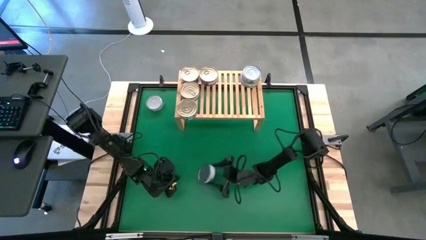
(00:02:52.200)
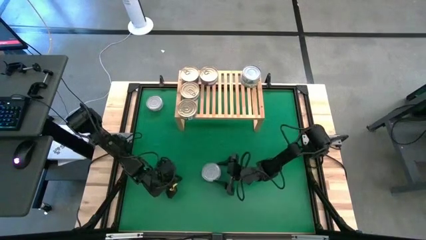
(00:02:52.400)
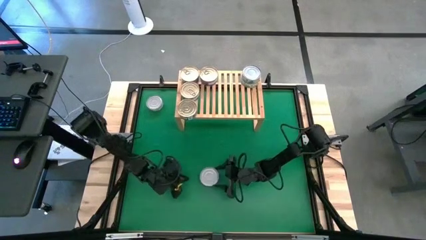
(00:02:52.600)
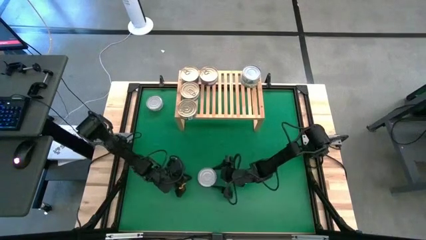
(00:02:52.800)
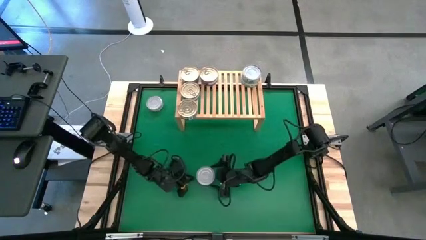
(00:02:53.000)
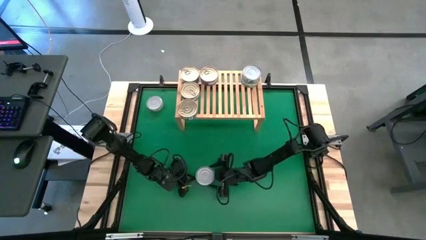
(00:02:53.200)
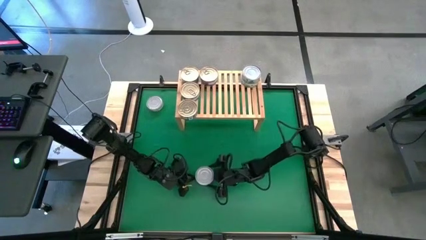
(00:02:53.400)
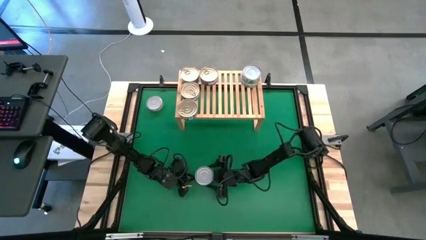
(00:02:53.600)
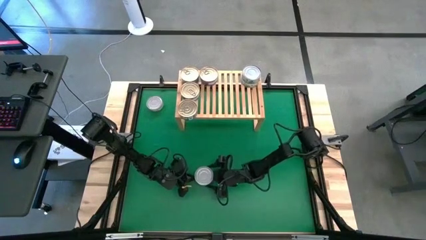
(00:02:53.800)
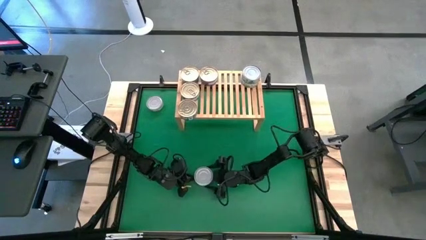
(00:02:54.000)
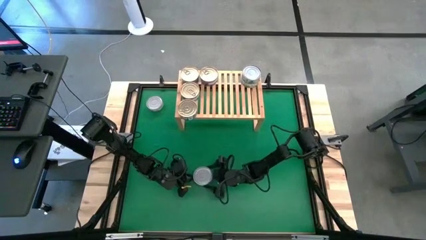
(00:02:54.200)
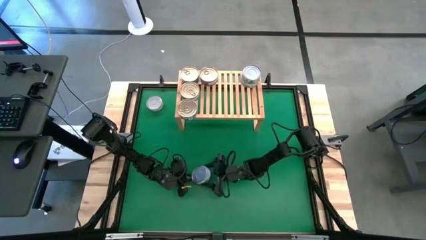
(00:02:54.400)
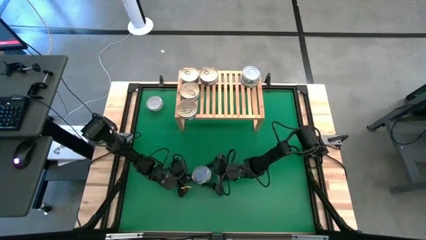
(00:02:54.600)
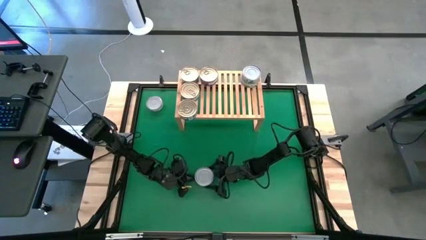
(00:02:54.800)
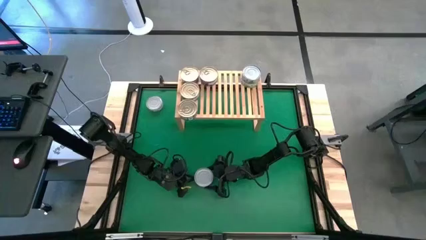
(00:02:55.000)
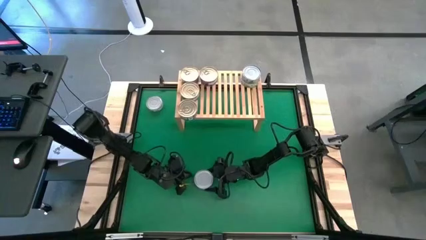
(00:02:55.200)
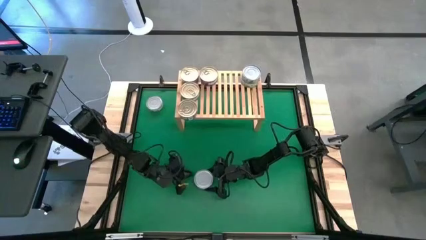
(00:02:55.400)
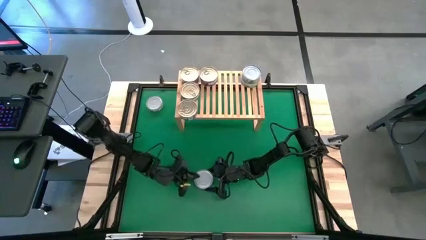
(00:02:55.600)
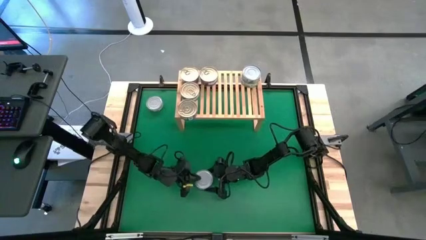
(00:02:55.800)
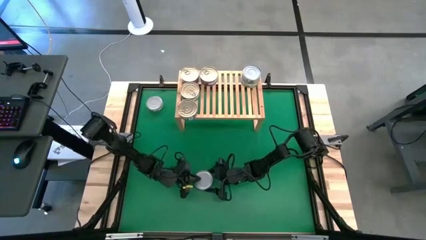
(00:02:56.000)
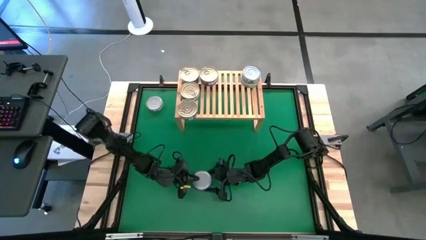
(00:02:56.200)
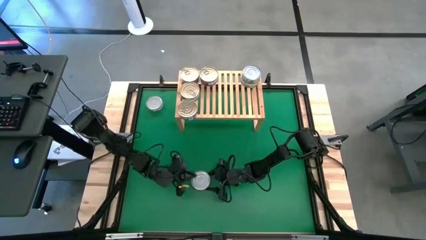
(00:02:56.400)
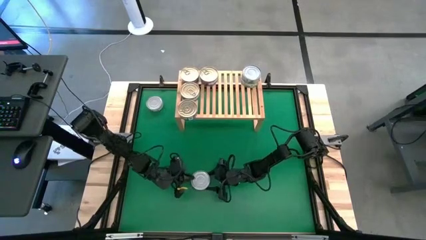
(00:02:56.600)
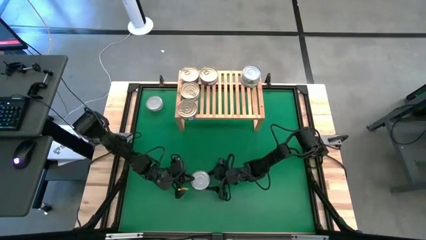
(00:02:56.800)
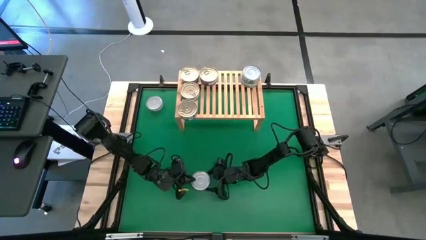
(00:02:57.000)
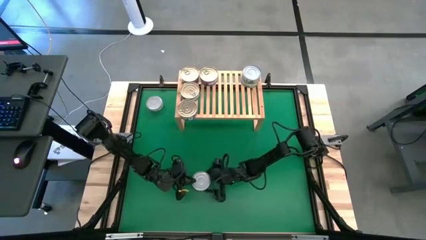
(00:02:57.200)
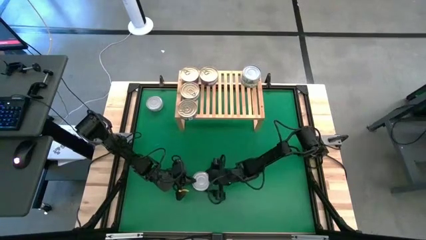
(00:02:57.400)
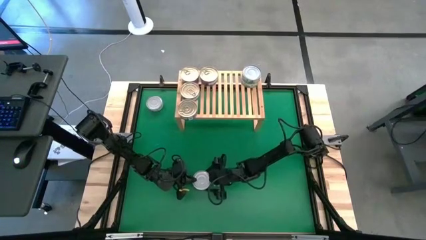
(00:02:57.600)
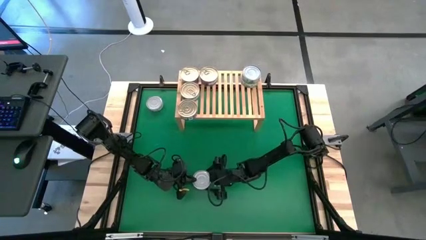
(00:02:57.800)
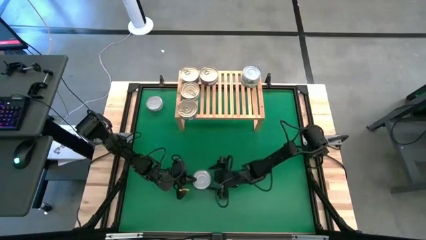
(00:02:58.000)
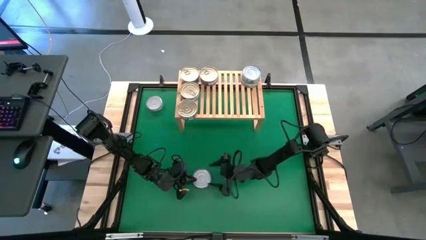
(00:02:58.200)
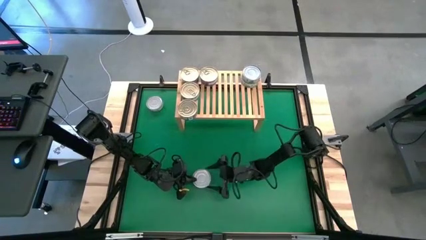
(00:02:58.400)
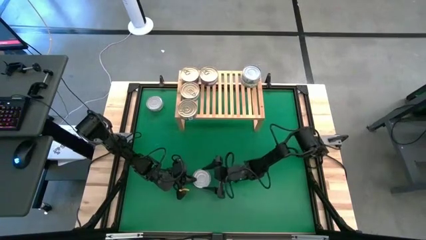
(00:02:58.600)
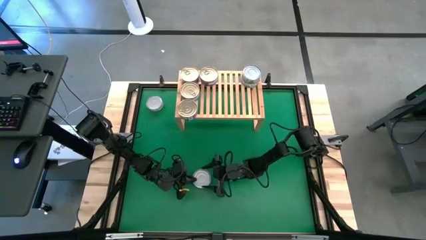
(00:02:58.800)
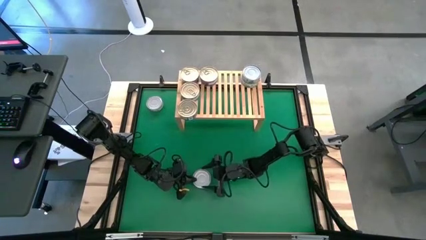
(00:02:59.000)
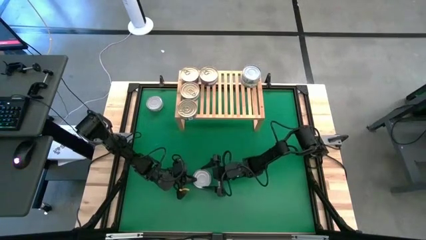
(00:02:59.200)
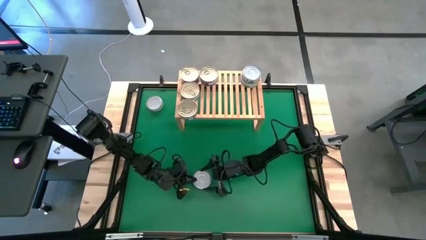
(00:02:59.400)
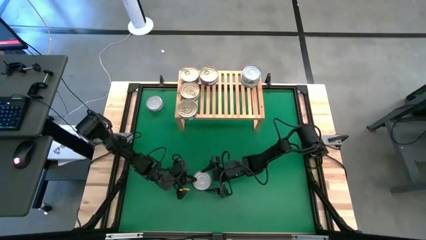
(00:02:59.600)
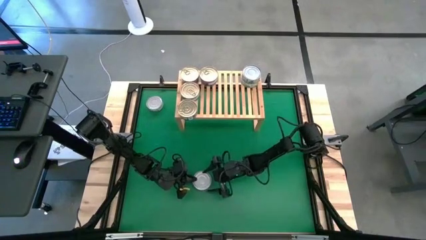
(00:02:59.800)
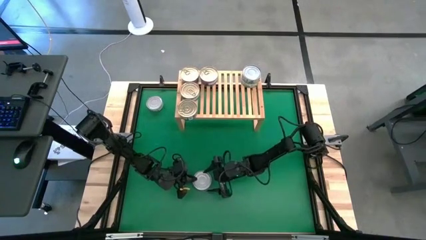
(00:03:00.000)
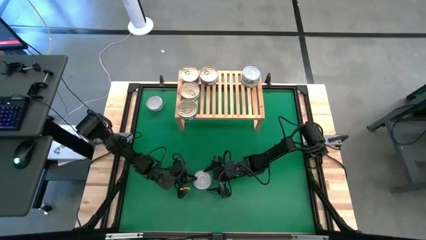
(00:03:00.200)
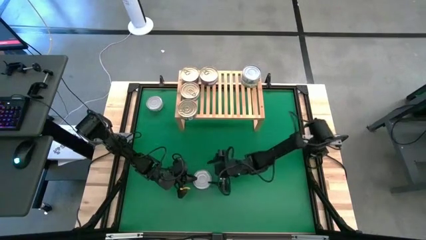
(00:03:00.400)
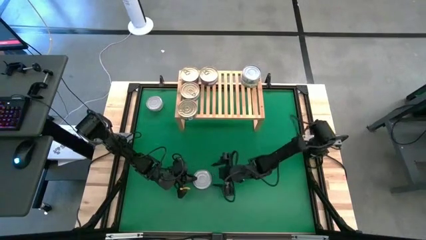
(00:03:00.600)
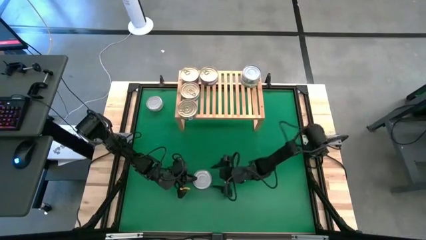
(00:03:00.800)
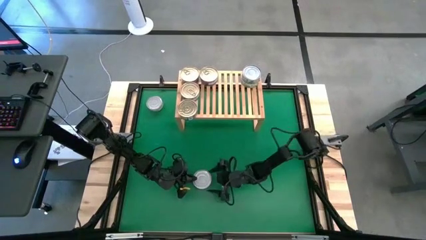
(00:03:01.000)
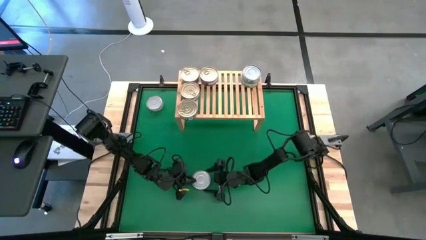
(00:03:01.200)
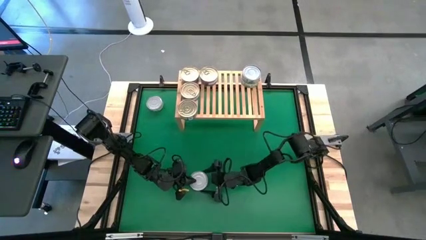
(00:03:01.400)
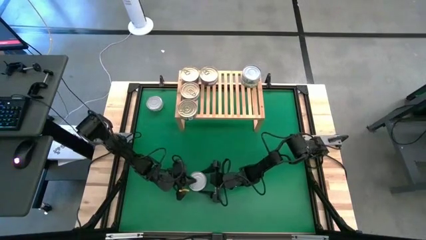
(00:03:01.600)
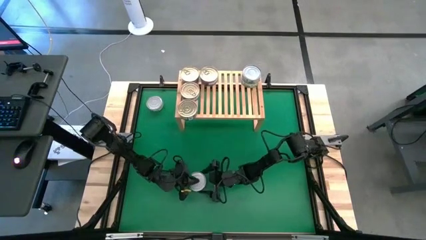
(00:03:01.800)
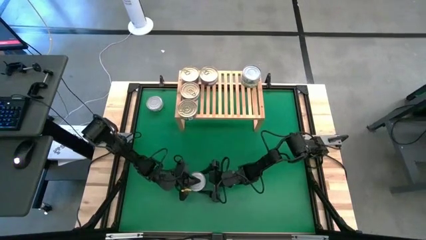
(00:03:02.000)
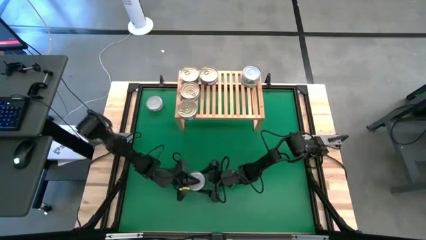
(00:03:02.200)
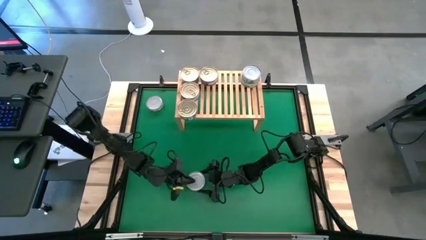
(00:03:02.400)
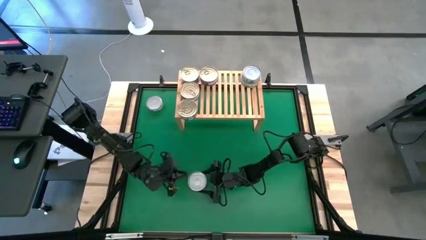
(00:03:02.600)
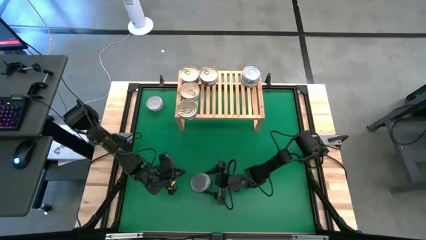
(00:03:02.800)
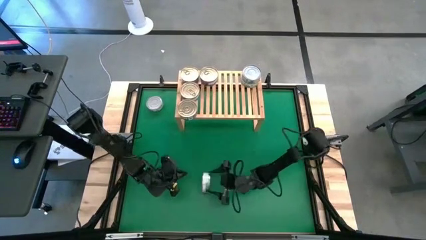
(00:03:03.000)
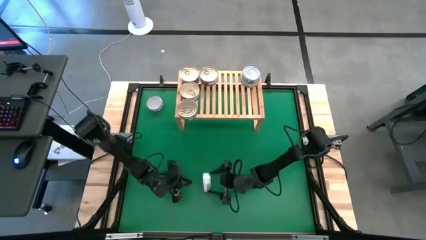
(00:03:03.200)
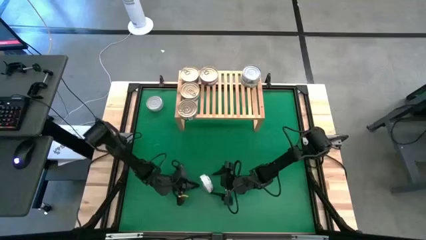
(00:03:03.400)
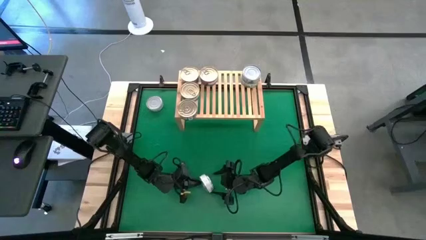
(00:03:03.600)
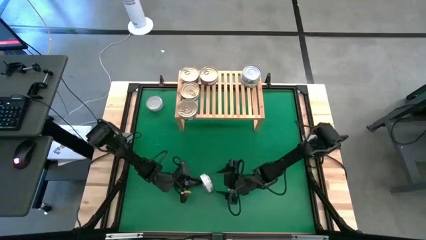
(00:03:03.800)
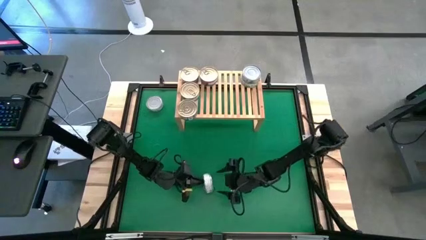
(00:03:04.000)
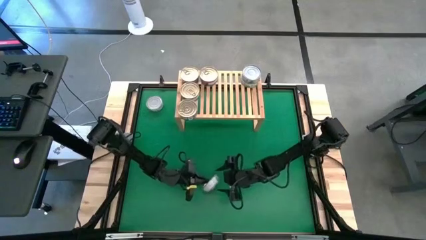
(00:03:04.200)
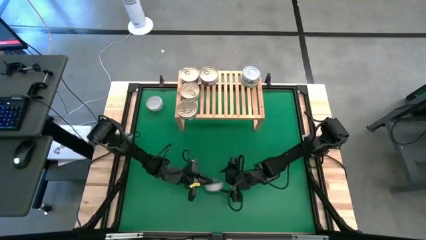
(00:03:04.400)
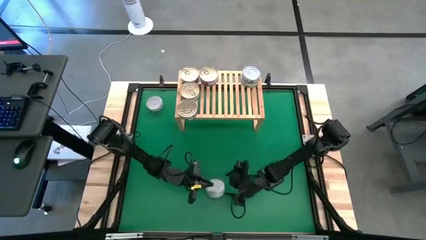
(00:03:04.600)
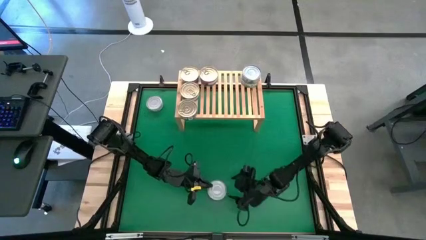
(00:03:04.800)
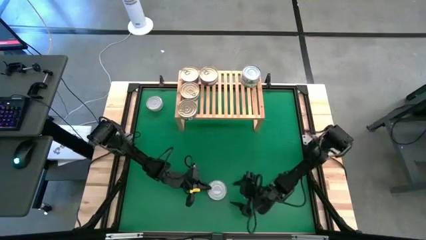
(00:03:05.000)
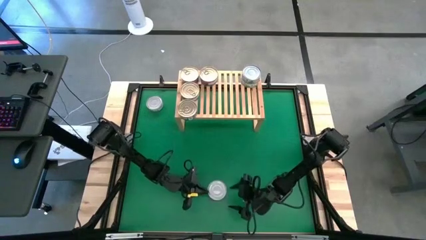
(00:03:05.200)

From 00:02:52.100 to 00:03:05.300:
Task: Stack canned seafood by type on shelf
Put the center green tuna can on the shelf aligned with the other green tuna can

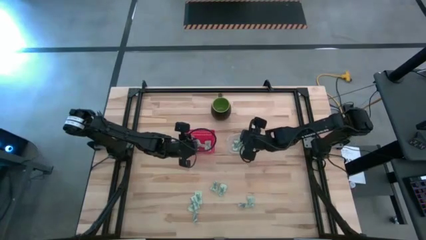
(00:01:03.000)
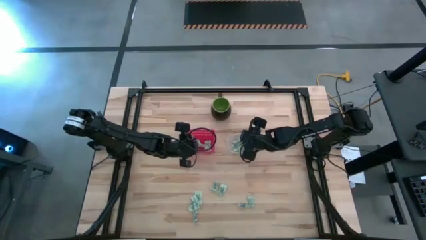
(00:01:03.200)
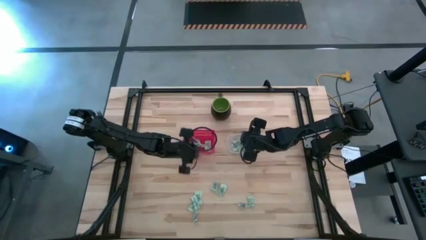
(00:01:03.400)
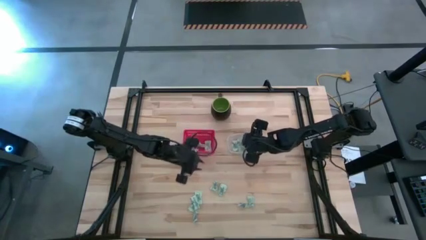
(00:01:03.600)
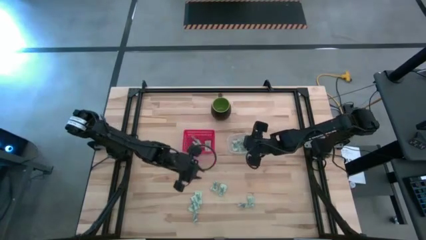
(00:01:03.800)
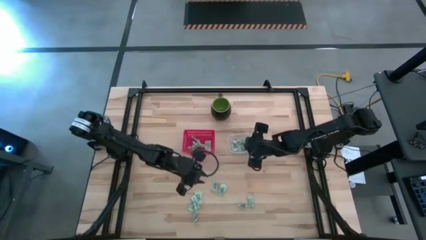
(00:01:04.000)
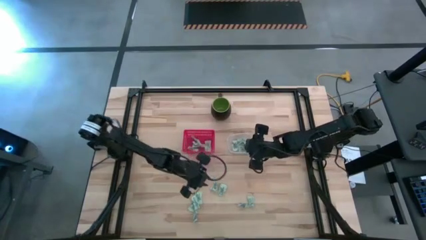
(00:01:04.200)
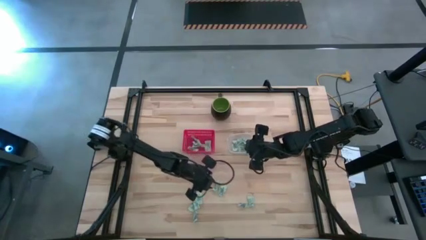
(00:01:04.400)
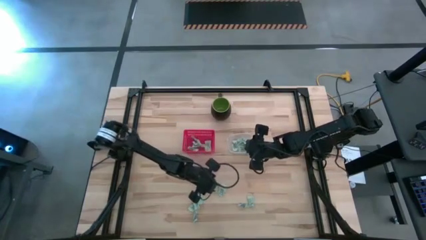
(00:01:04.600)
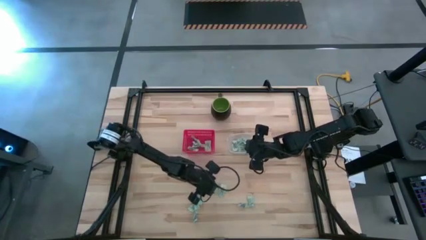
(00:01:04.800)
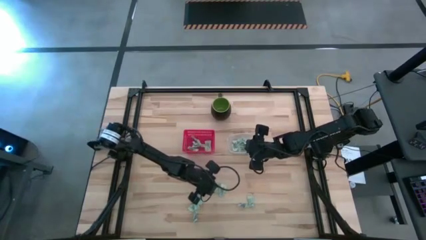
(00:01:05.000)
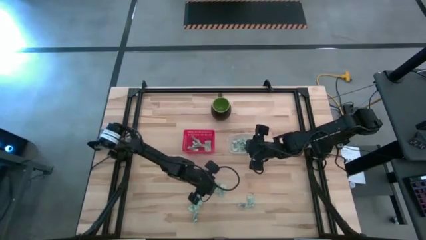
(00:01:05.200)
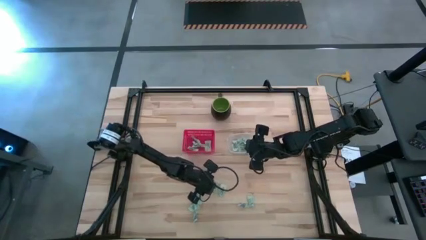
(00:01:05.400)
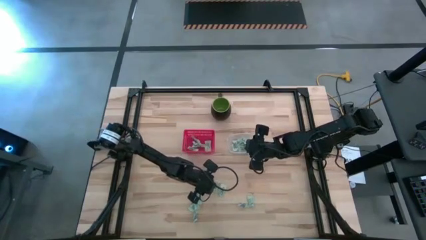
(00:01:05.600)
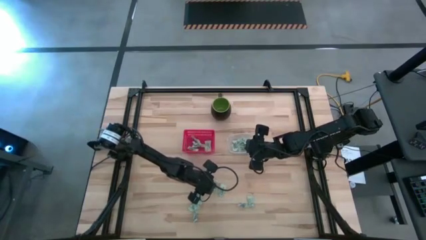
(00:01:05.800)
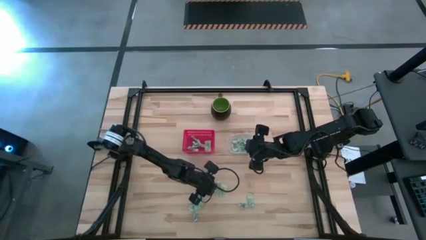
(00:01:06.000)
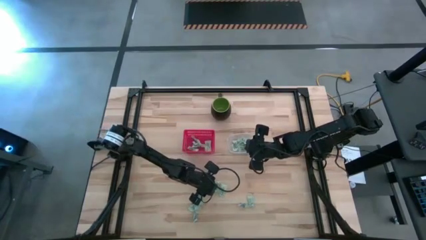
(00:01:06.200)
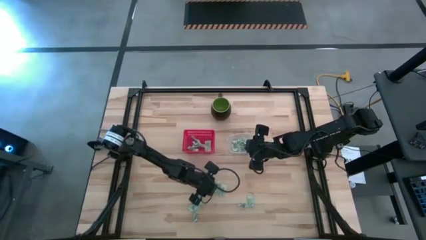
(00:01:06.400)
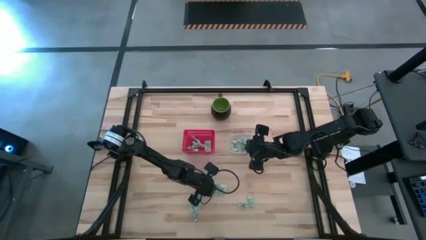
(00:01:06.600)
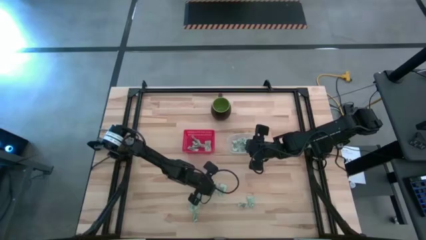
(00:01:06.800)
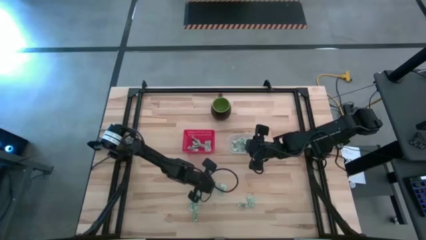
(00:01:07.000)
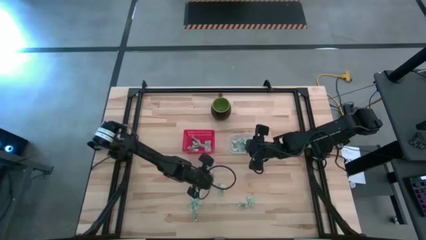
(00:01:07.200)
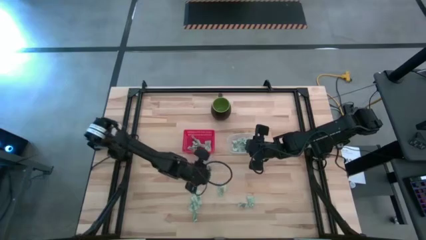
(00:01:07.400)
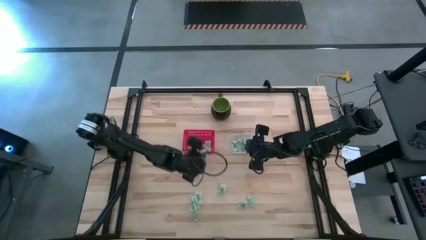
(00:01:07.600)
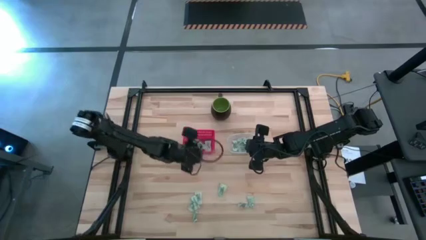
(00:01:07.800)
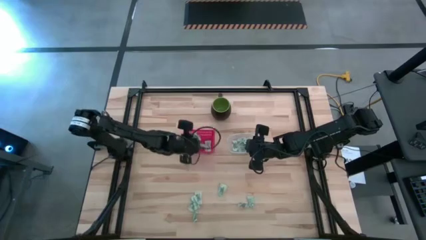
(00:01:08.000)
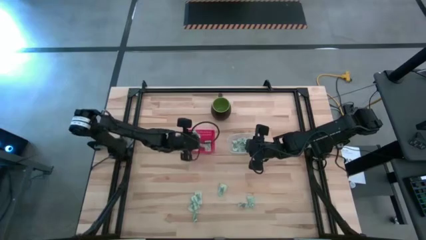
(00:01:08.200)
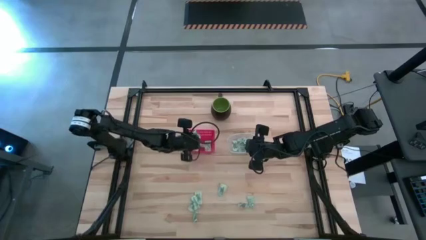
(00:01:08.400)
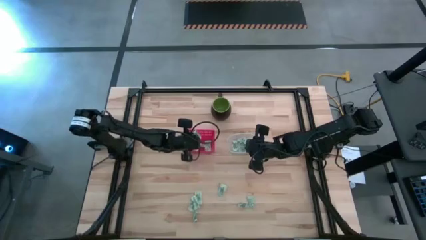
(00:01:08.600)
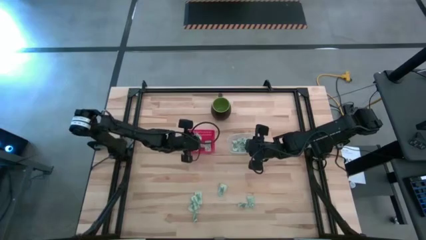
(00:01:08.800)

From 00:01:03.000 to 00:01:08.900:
Task: Pick and place items into bin
Put the stevia packet into the red bin
